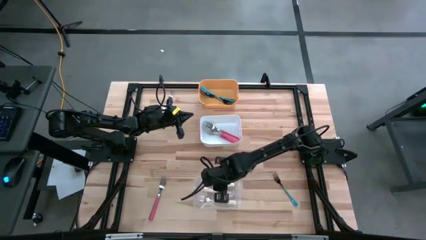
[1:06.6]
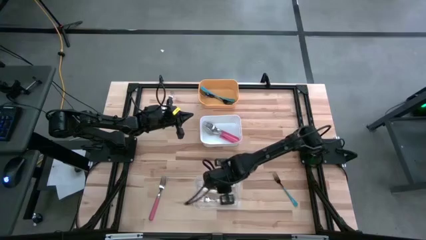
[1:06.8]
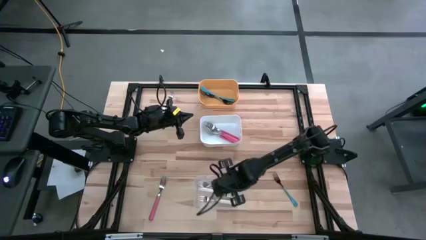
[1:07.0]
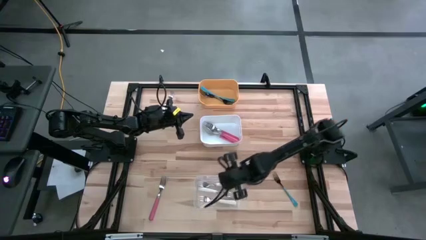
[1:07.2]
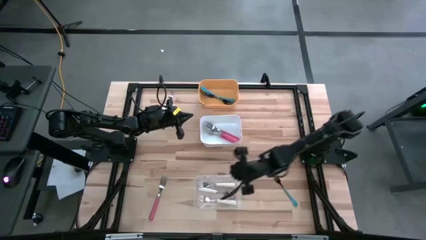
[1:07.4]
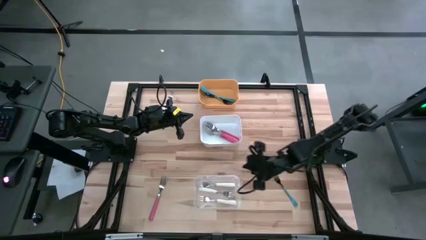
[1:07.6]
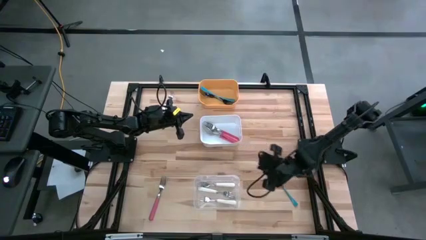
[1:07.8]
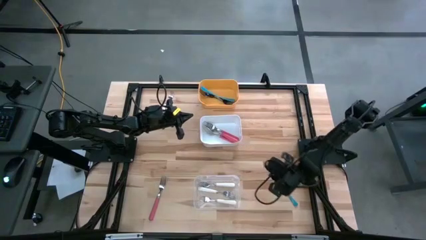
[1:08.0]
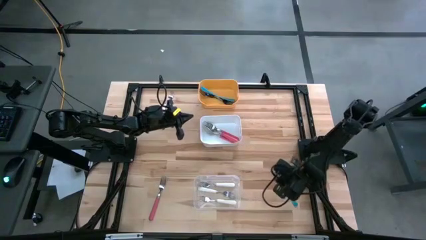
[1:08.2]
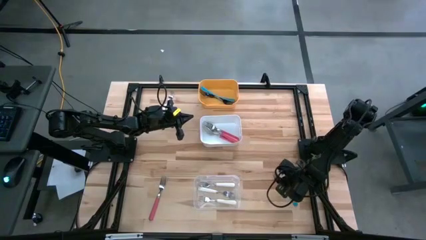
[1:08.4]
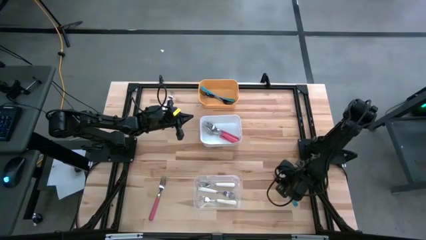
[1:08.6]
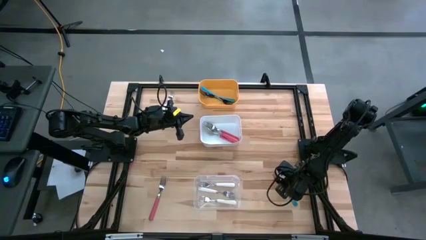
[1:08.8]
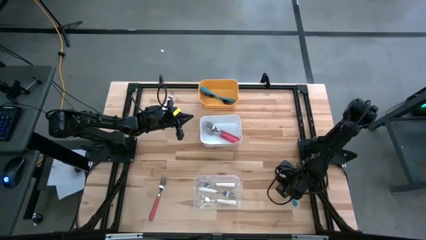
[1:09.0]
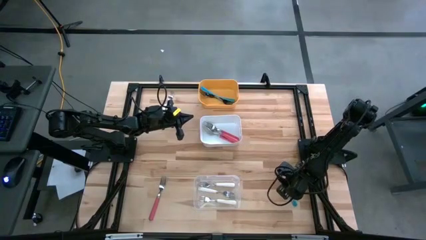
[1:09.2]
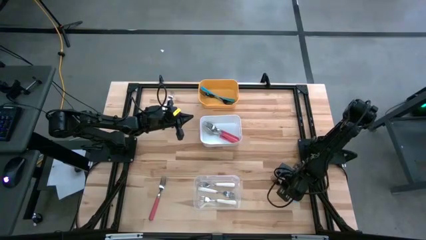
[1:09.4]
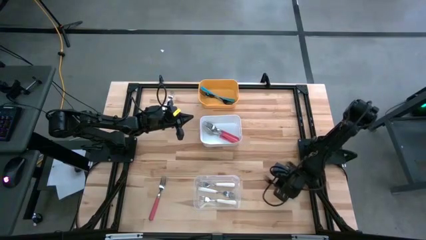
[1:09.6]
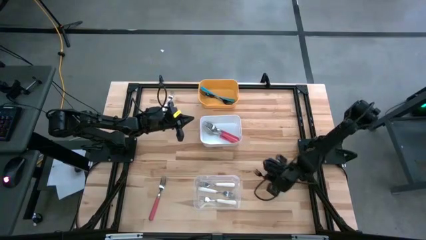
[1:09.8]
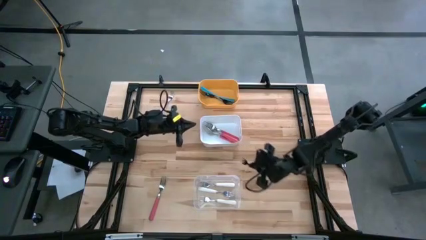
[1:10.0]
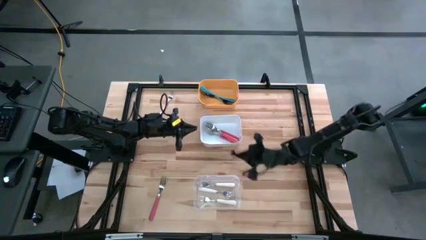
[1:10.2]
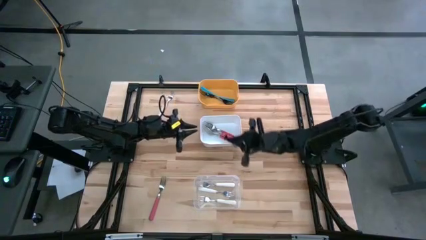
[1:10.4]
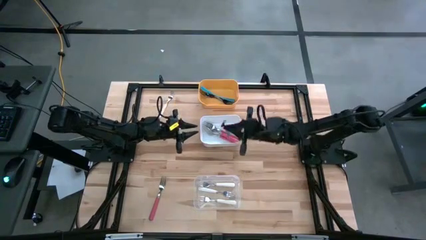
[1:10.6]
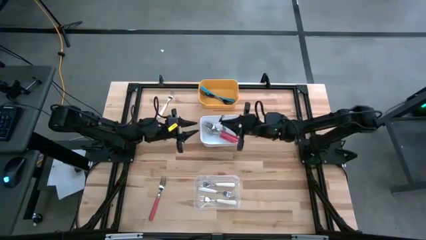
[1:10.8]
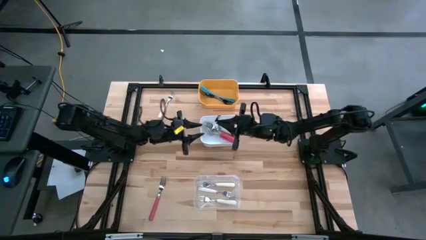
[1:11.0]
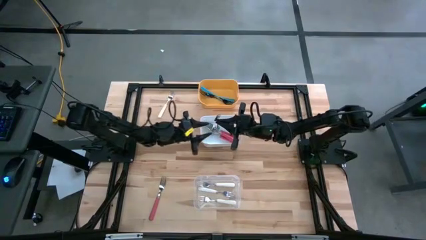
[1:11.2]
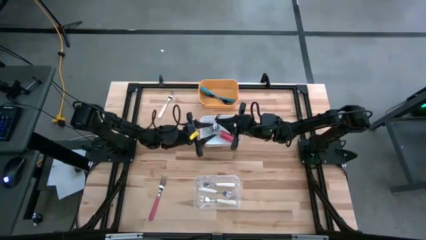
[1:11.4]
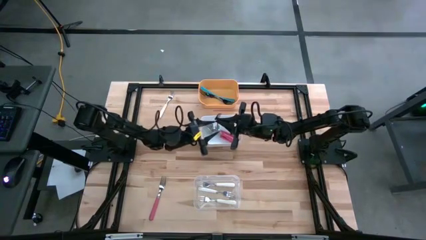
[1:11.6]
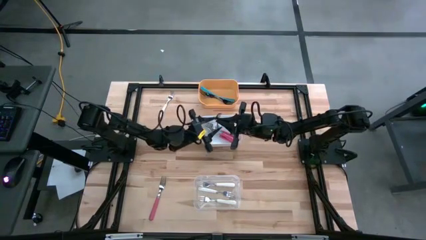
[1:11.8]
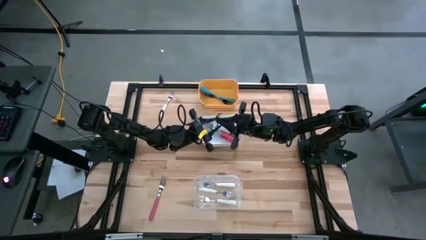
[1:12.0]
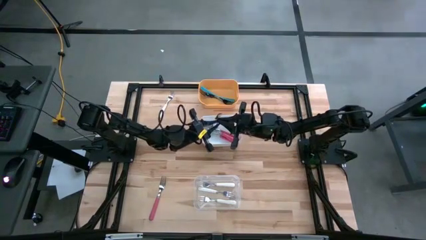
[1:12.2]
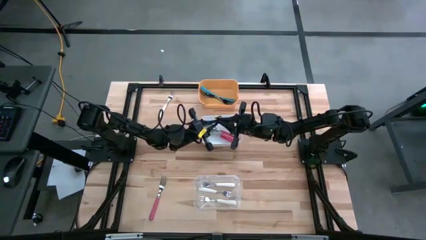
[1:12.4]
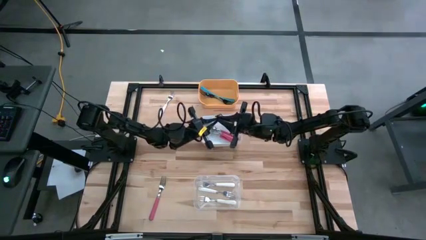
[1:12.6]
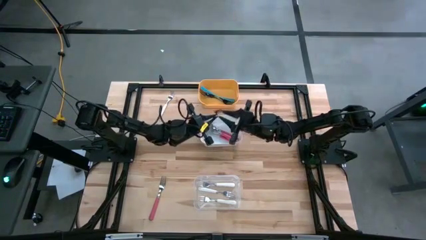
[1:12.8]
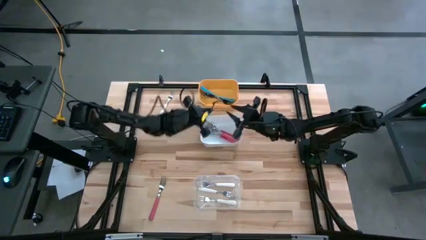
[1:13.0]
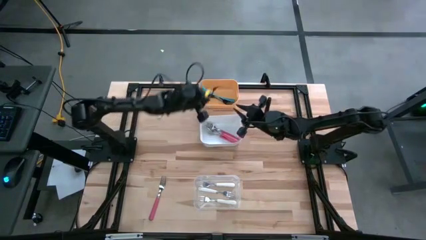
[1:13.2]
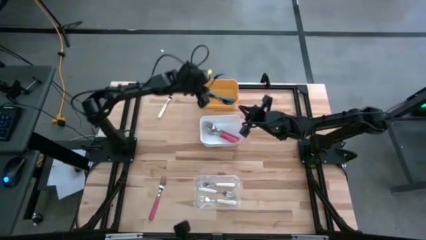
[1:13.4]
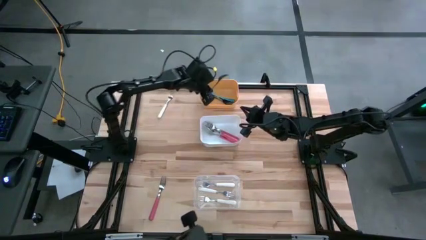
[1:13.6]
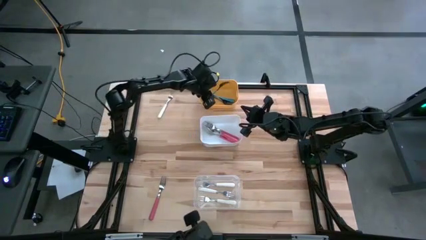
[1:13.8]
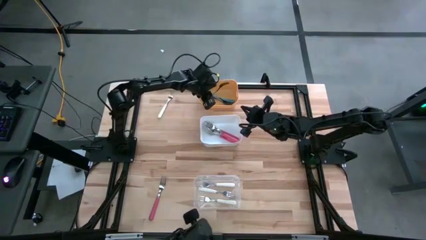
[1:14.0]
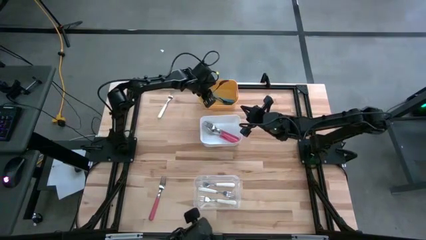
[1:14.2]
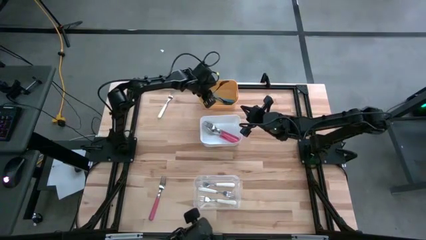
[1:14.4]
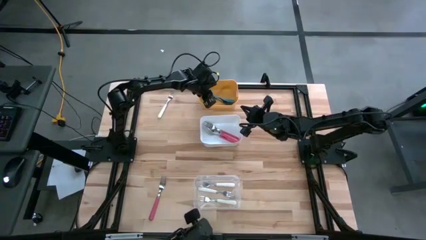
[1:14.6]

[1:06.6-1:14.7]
Task: Sort silverware by color (type)
Put the blue fork into the yellow bin

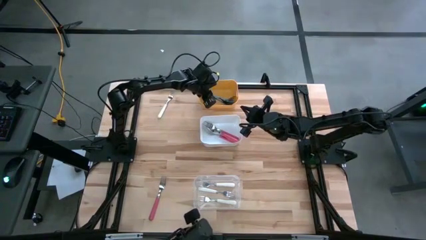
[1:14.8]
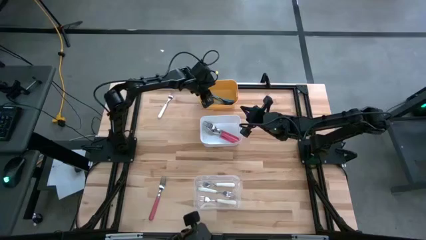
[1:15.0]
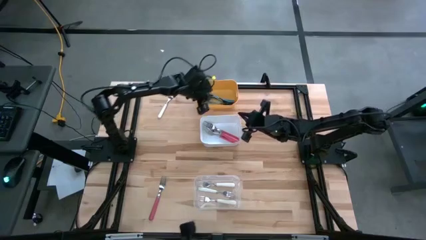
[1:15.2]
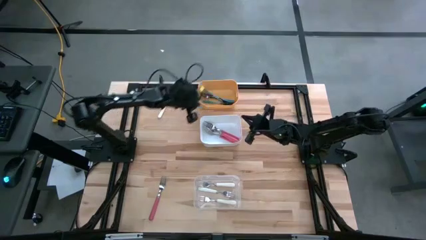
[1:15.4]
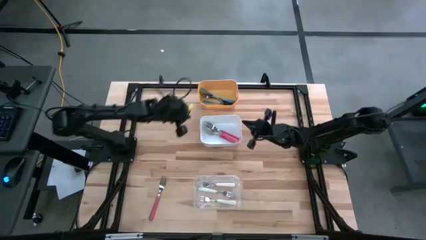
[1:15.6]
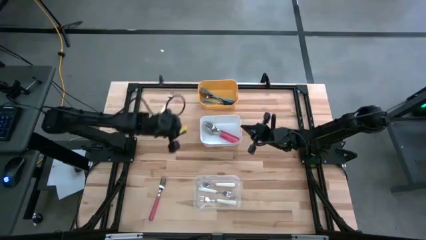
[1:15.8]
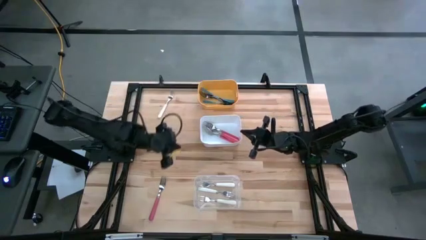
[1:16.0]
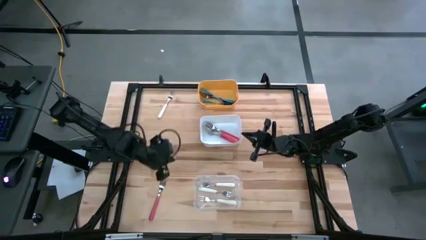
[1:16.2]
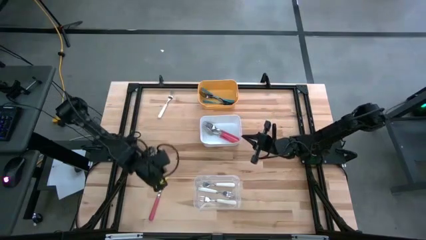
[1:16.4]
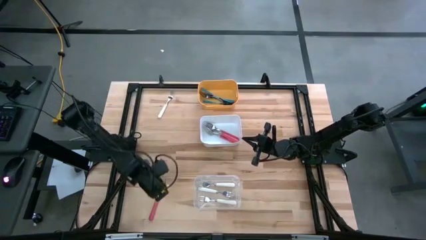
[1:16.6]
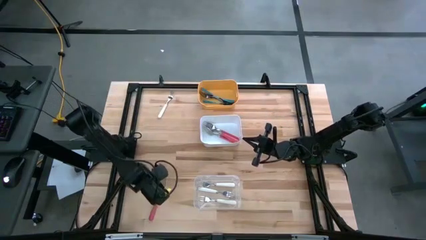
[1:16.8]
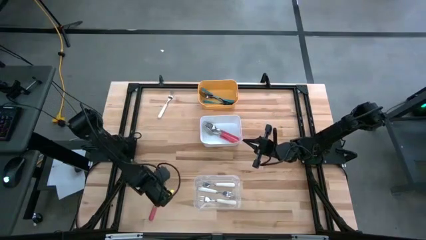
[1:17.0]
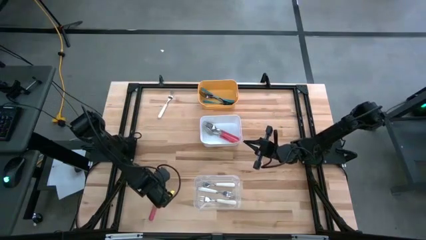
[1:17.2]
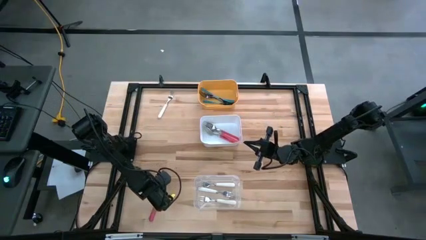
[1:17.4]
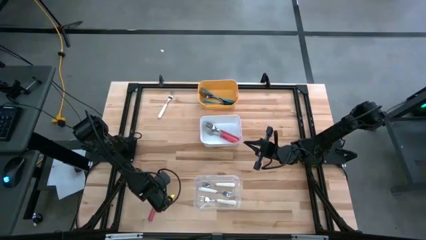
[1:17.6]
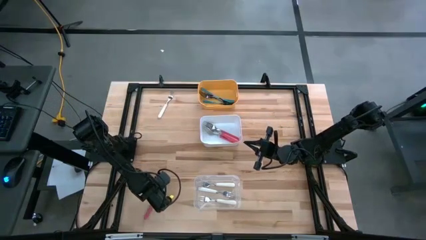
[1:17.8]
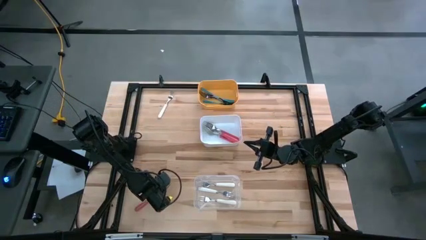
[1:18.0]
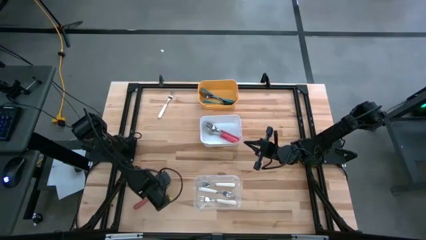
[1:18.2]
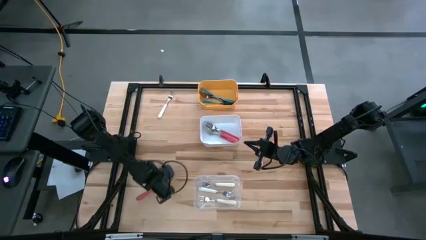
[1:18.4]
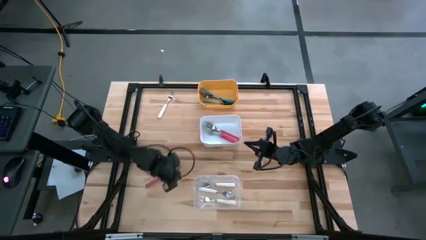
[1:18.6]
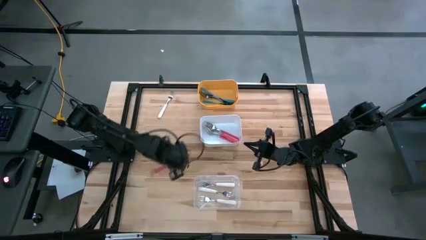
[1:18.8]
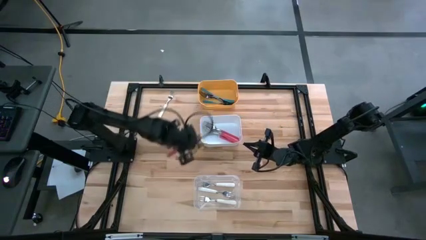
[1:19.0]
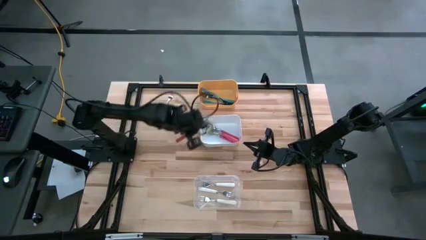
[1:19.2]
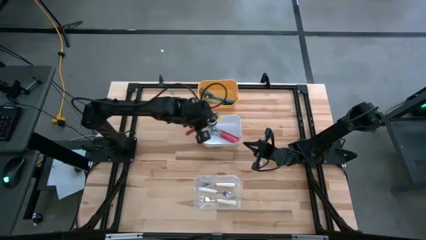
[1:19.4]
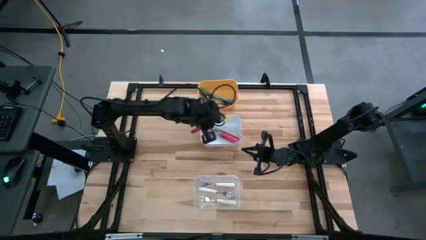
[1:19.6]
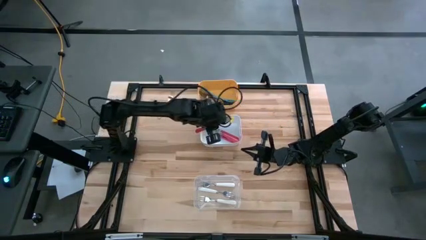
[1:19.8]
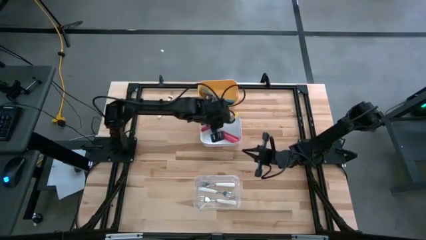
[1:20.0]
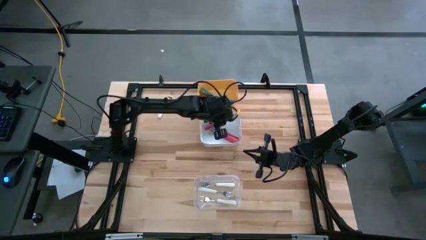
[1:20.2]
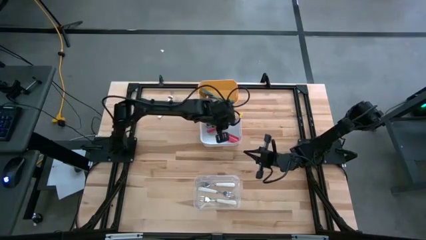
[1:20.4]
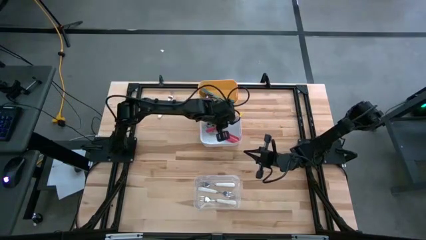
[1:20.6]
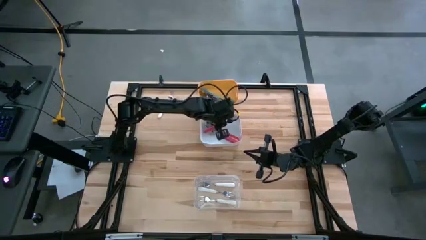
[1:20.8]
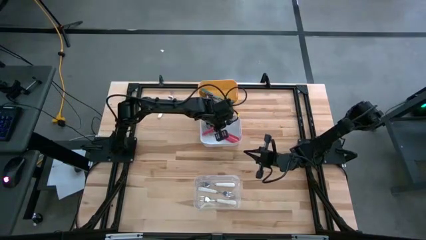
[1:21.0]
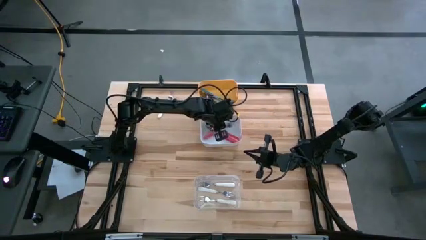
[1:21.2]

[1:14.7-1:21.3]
Put the pink fork into the white bin

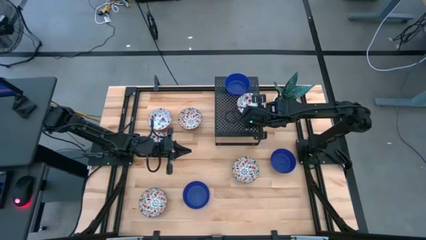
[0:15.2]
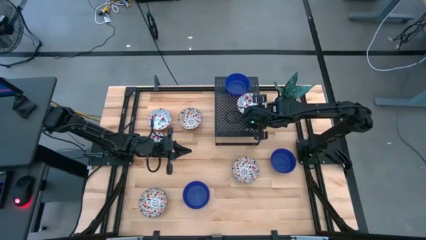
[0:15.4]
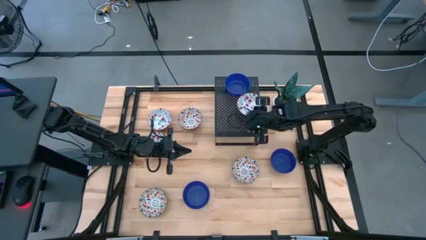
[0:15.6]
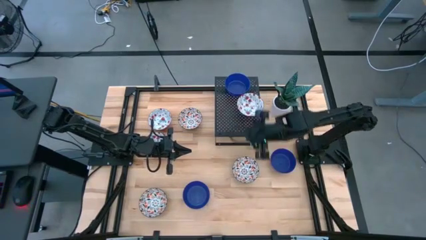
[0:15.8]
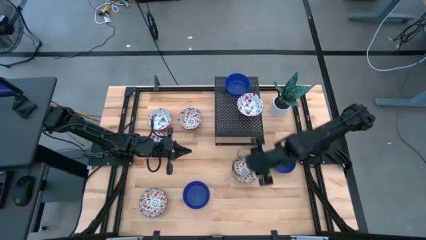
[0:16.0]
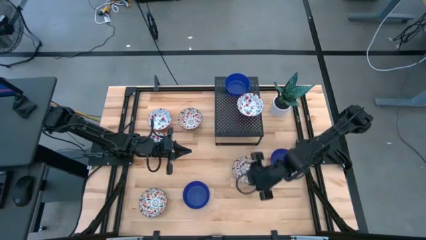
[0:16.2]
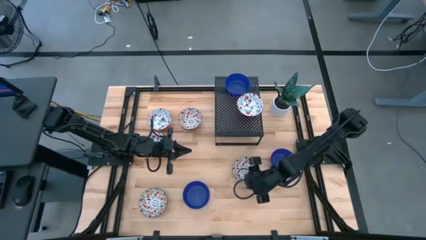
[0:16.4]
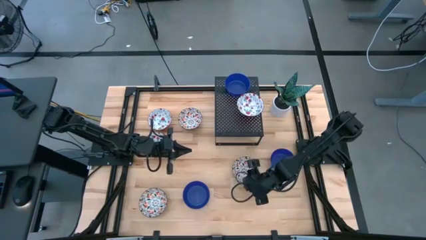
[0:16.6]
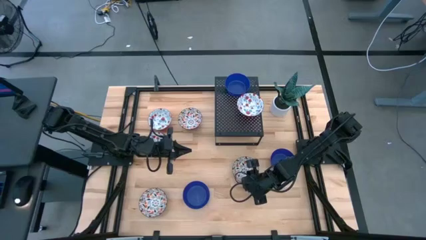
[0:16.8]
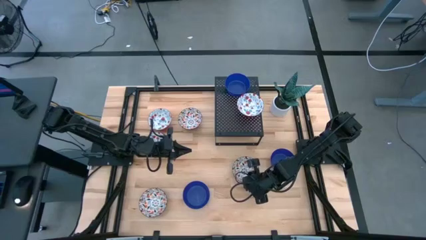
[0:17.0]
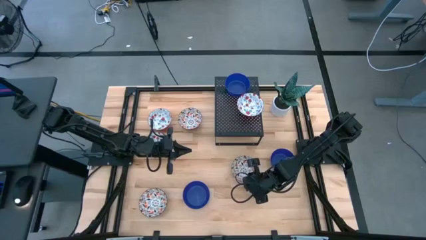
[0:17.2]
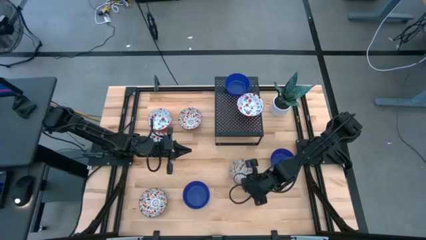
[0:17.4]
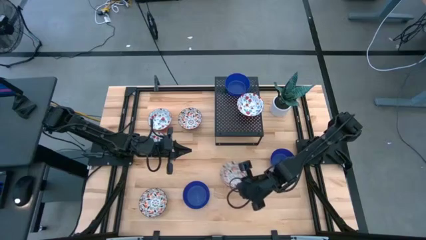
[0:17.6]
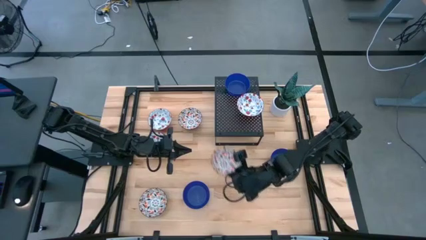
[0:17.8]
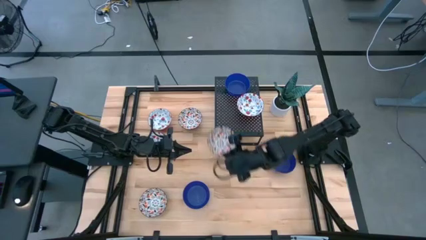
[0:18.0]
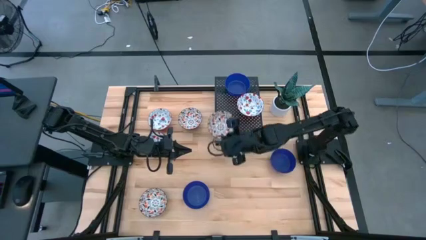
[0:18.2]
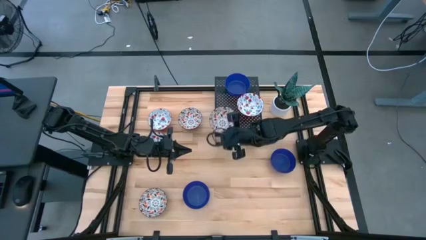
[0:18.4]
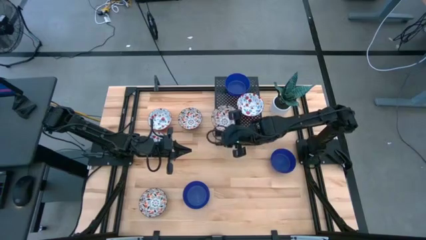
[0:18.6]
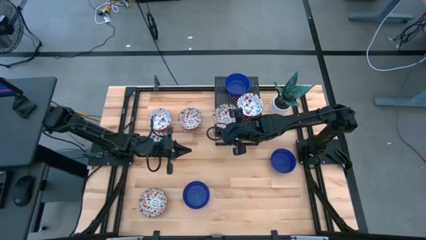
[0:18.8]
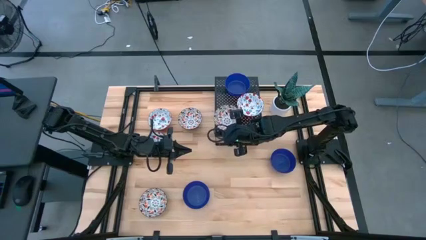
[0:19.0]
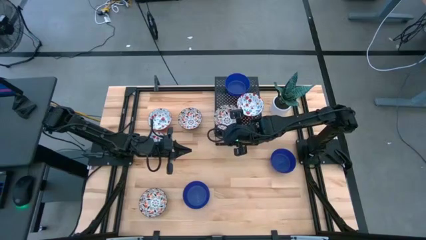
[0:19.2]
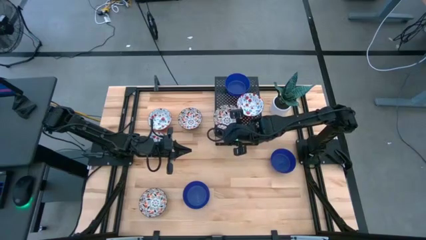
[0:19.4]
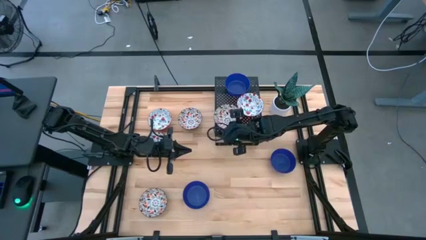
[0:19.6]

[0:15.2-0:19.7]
Task: Pick & Place Mini bowls
Put the middle black and white bowl on the shelf
